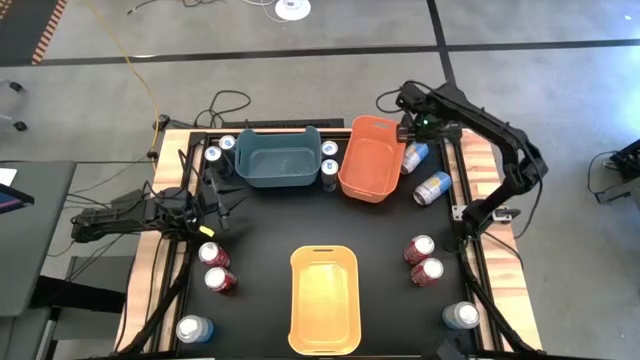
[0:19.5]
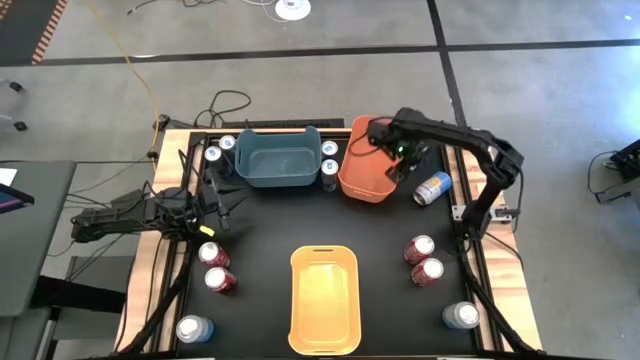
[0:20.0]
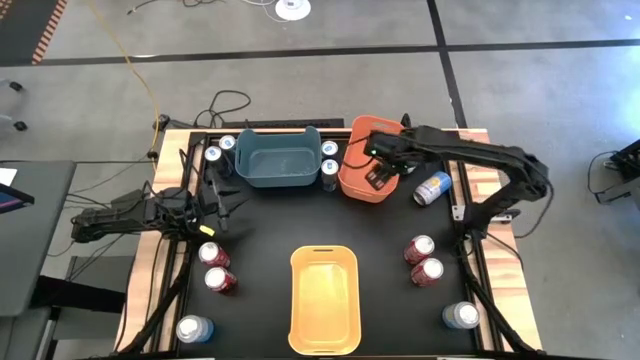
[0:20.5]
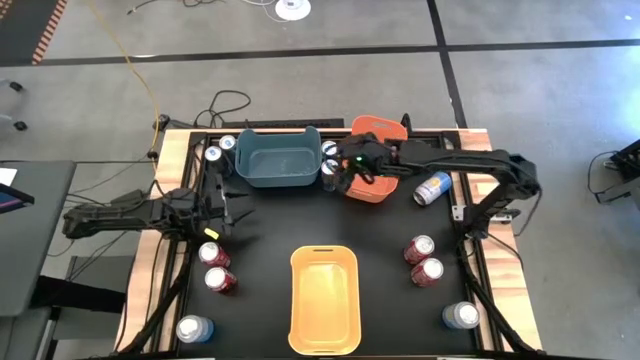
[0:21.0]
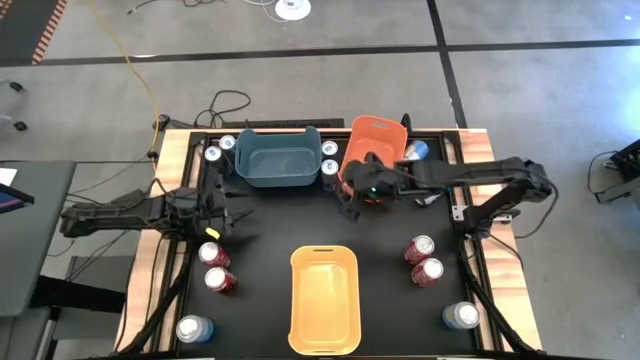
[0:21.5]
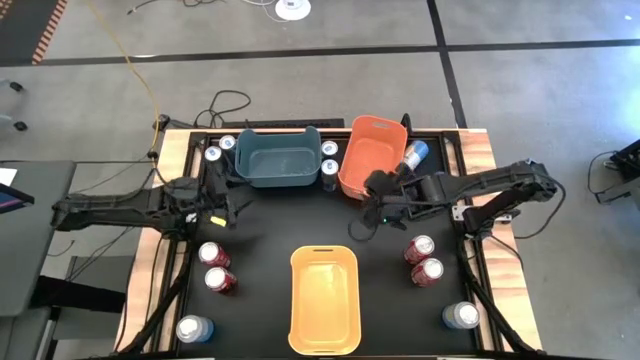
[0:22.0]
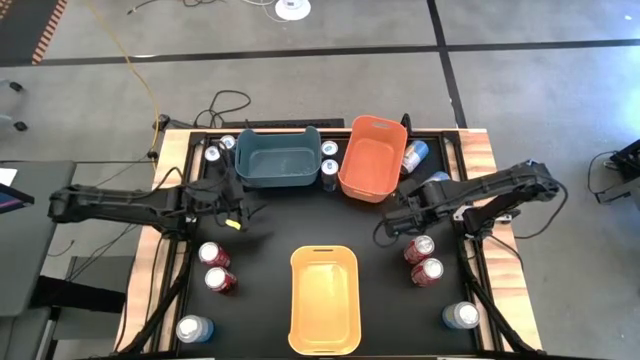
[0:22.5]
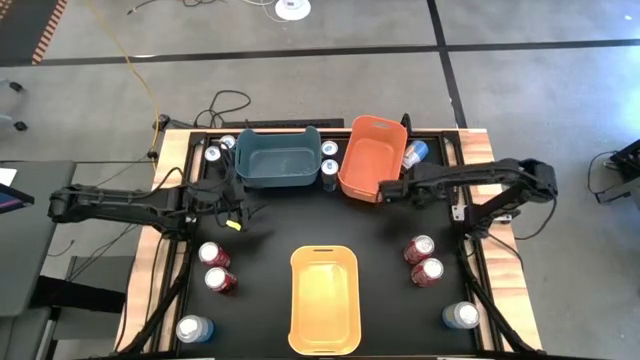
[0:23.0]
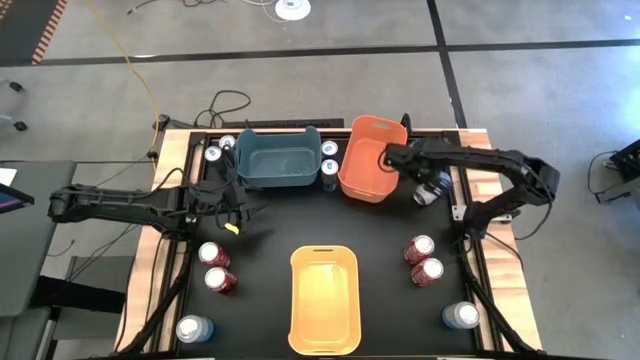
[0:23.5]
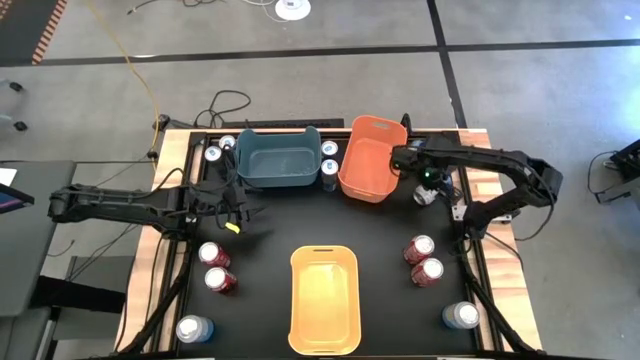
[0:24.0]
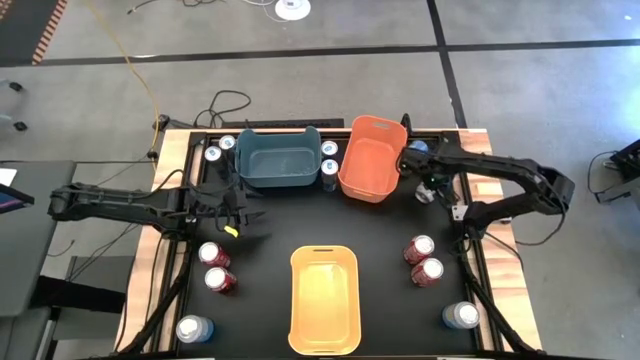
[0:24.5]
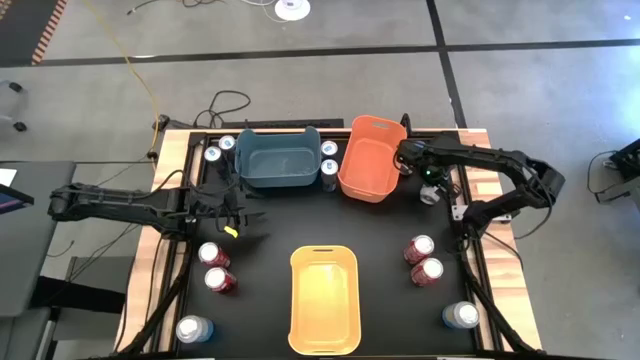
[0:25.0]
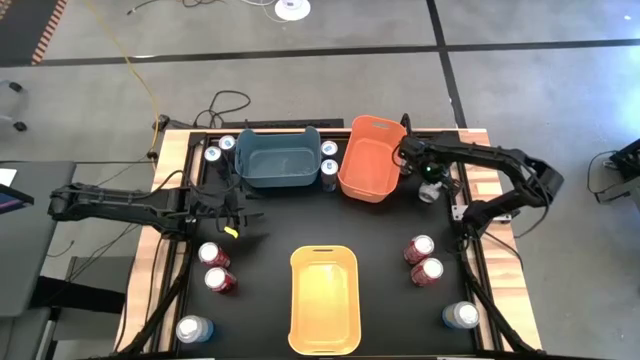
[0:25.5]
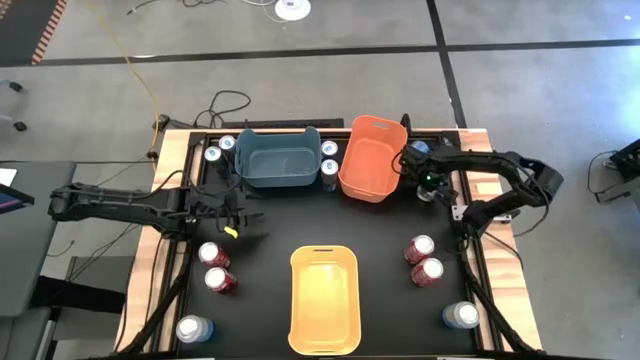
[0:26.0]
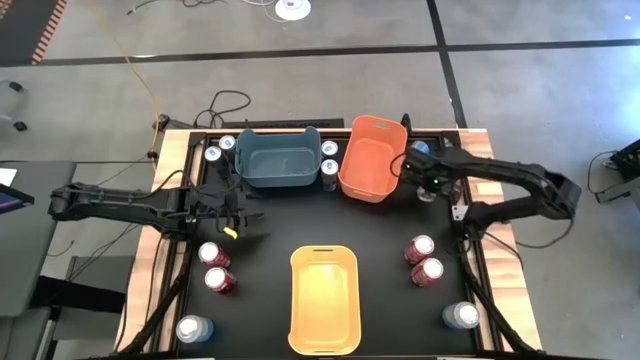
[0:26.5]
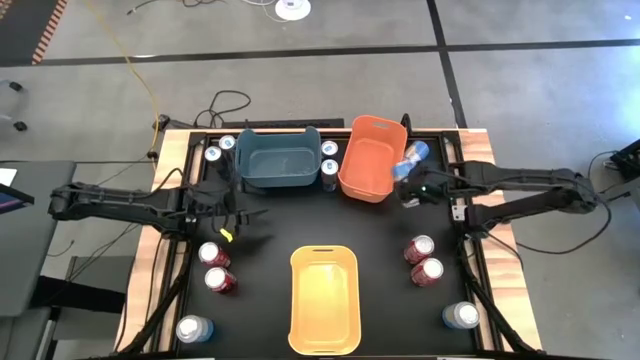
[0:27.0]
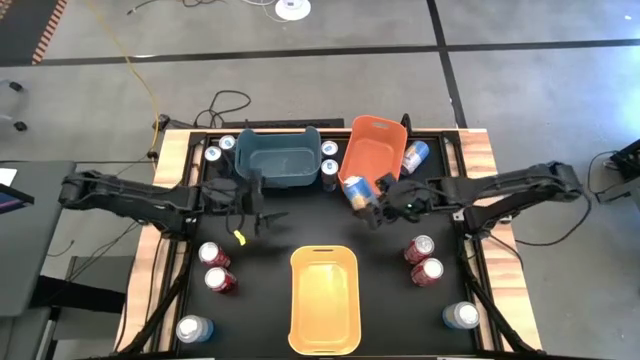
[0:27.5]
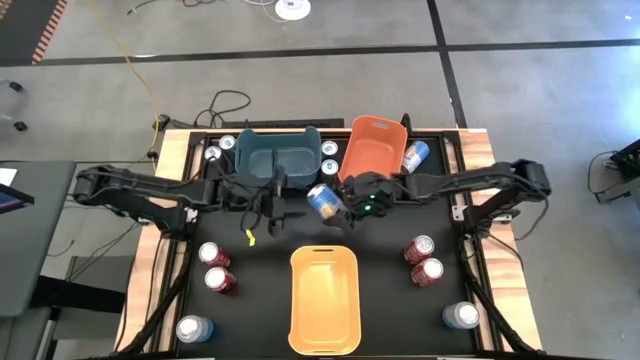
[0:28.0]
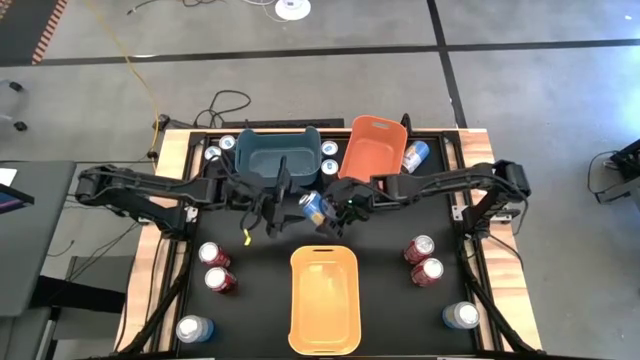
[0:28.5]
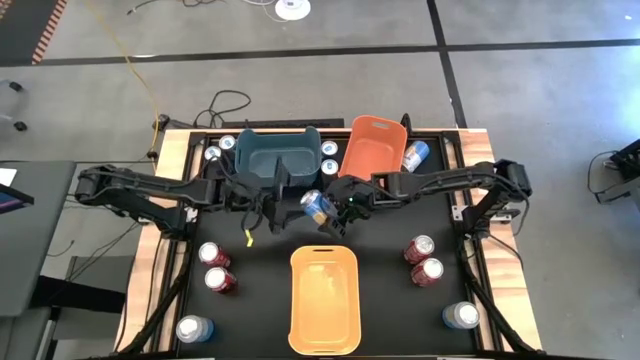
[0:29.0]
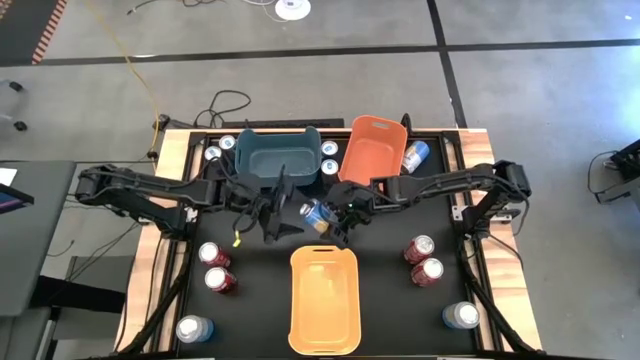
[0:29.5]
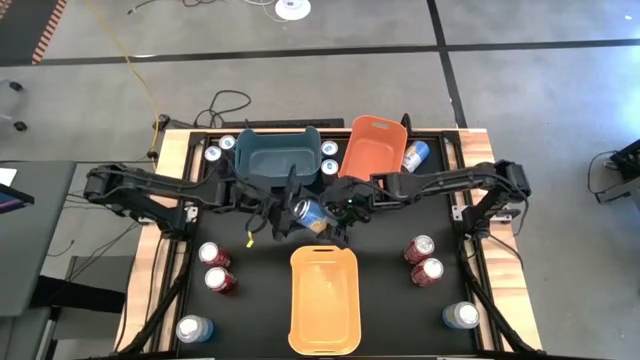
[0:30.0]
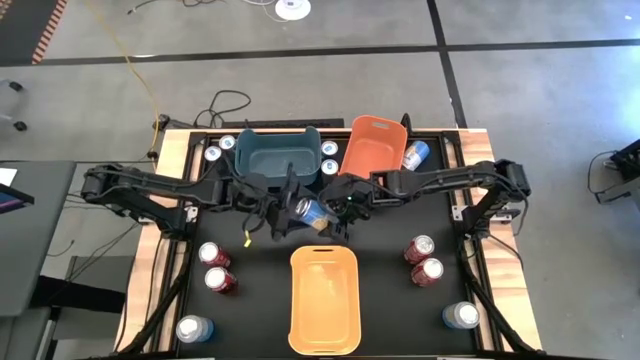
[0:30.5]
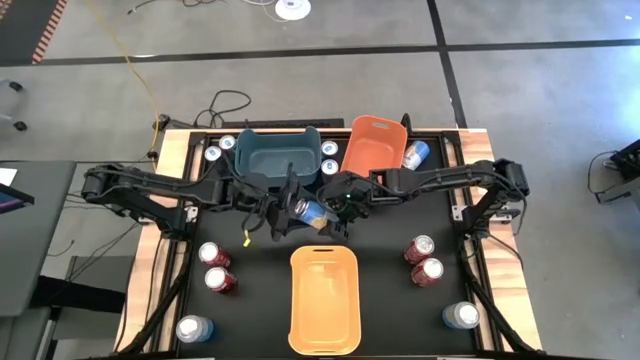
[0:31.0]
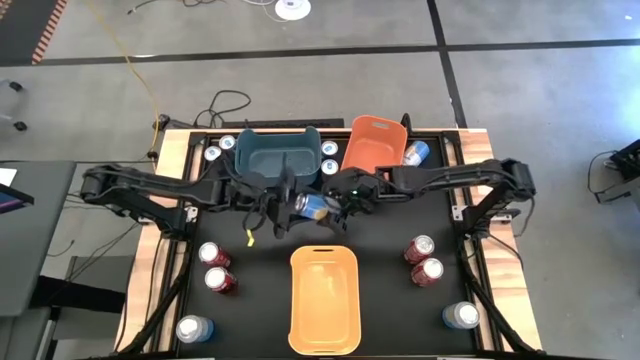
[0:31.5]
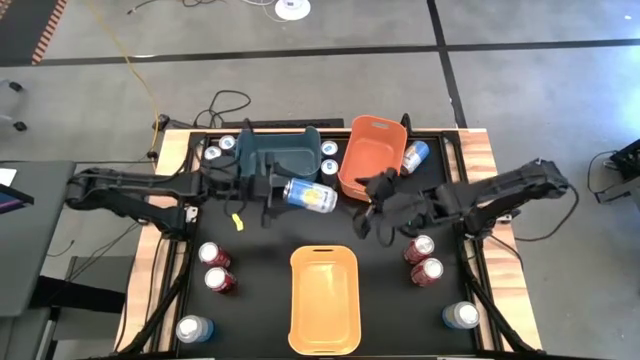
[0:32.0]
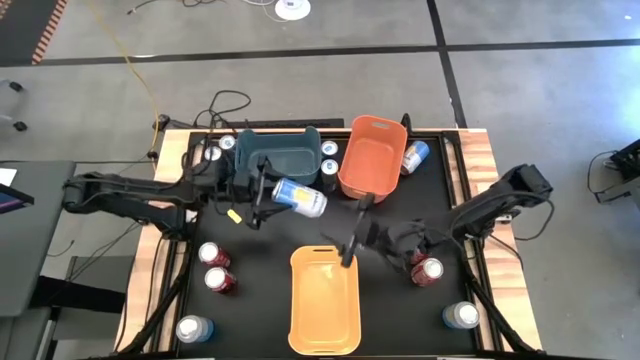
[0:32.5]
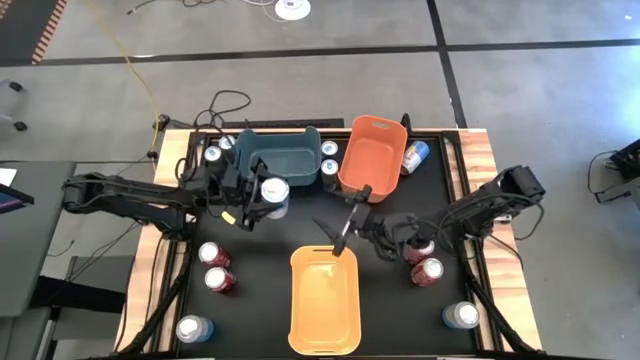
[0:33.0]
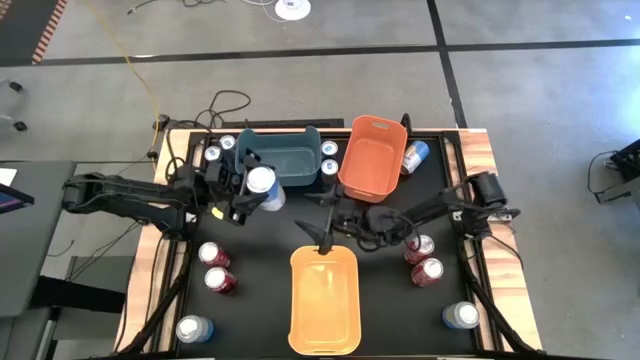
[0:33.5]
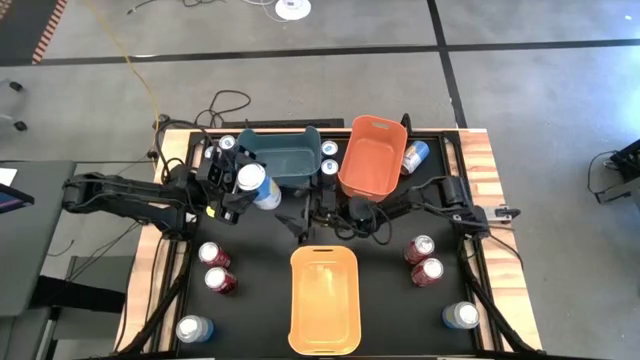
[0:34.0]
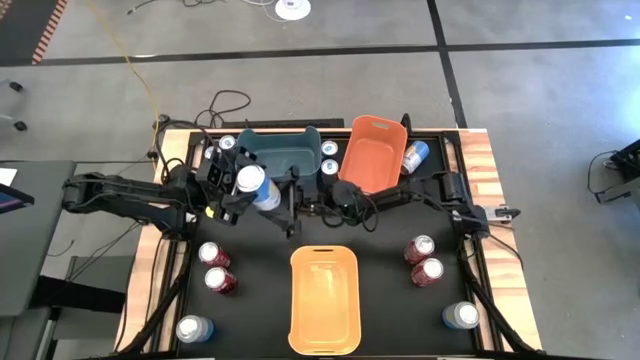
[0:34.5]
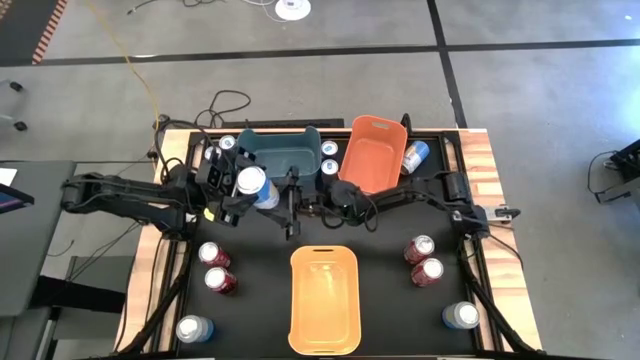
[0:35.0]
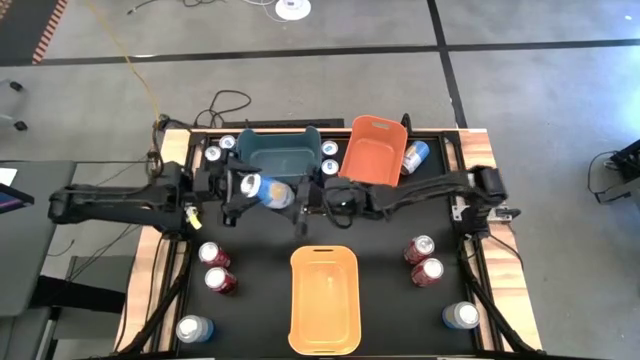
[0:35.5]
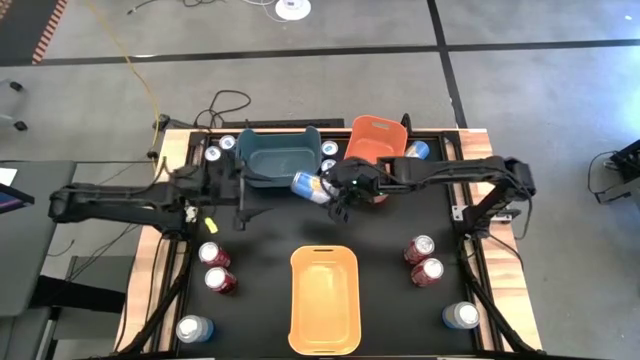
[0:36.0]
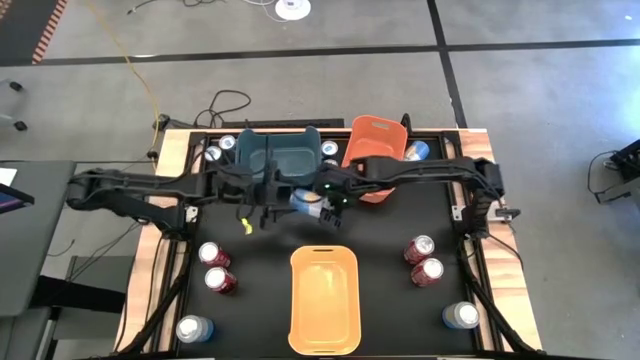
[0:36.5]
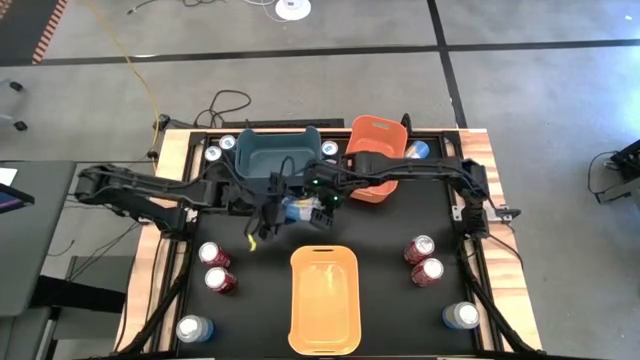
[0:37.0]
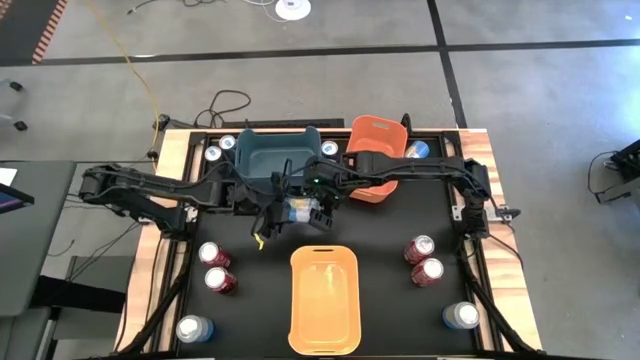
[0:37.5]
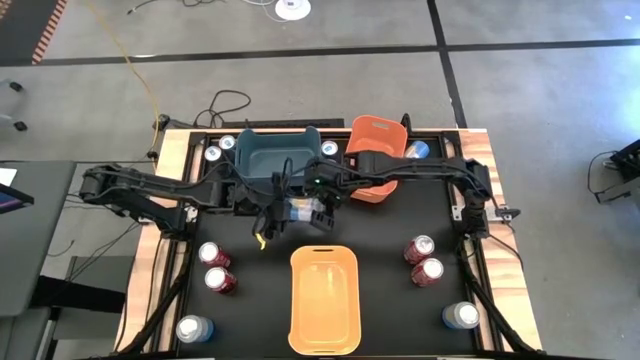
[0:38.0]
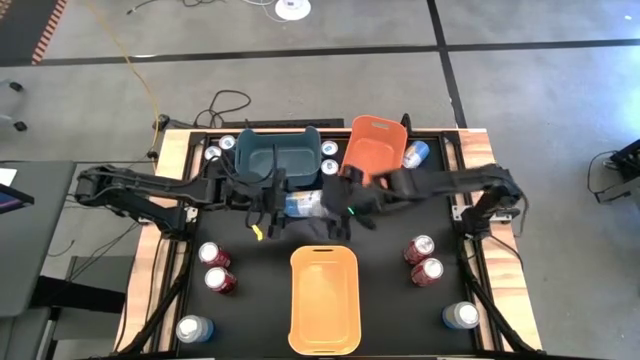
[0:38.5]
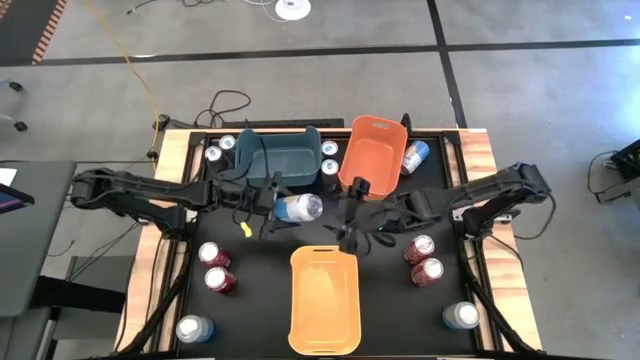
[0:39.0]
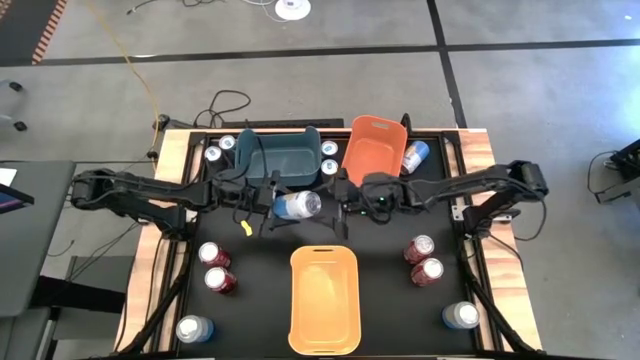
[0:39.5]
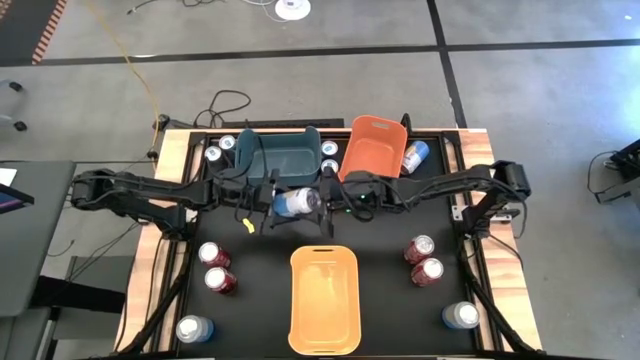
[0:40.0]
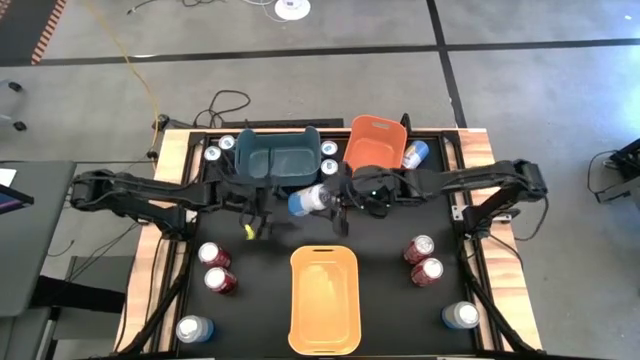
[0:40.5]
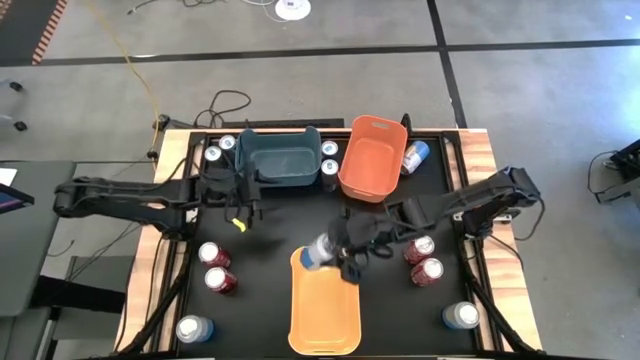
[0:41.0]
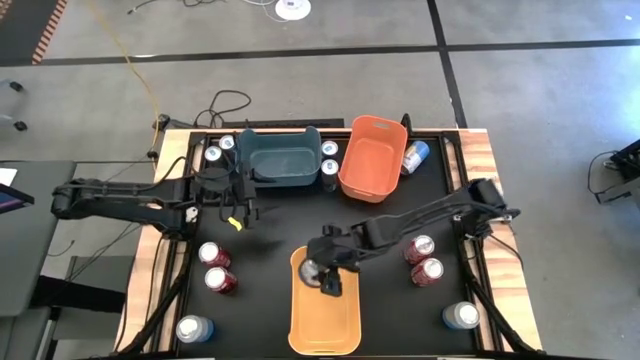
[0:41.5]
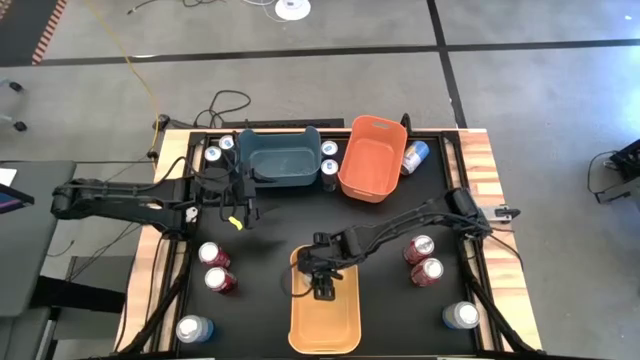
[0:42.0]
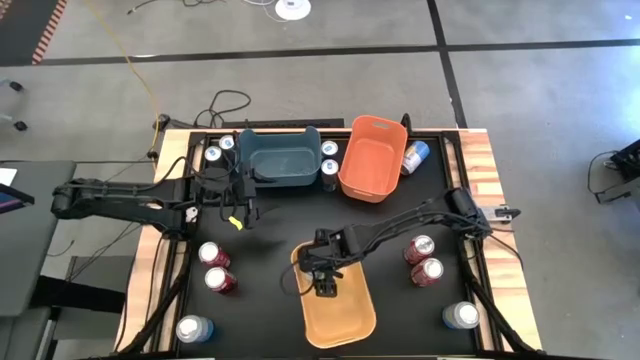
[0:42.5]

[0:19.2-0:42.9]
Task: Sort soda cans
Put the blue white soda can into the yellow bin
